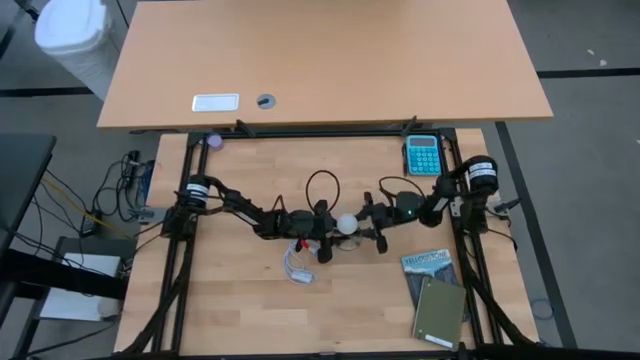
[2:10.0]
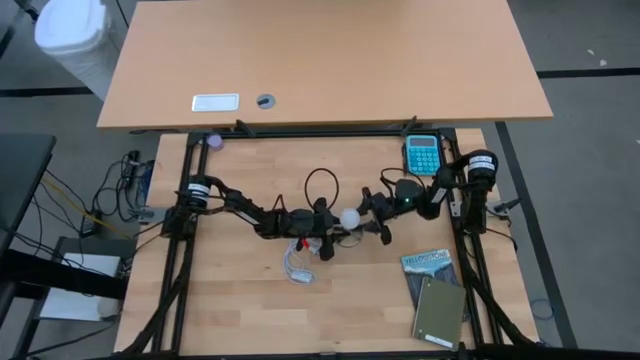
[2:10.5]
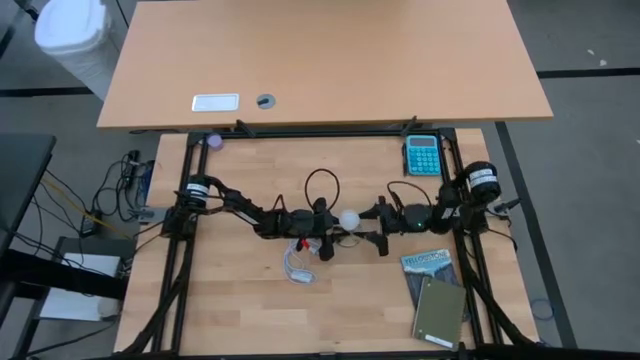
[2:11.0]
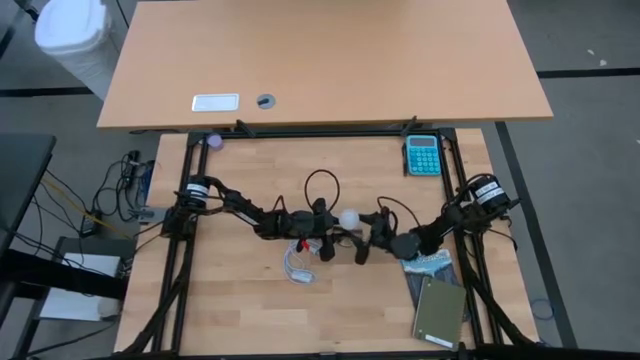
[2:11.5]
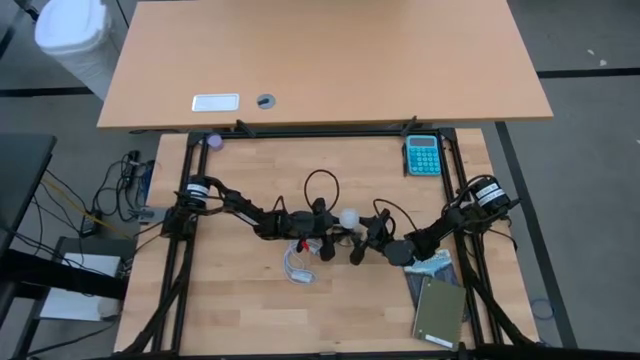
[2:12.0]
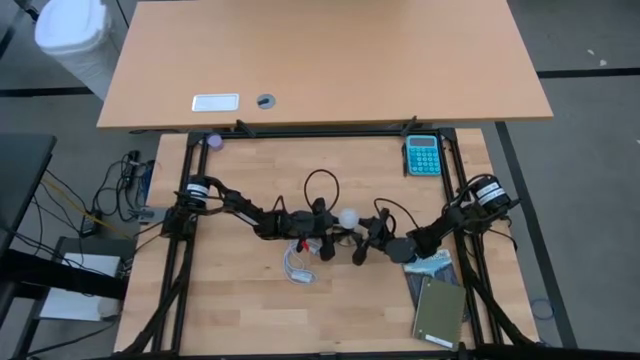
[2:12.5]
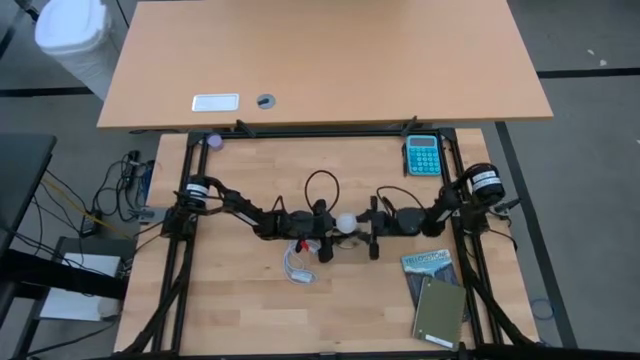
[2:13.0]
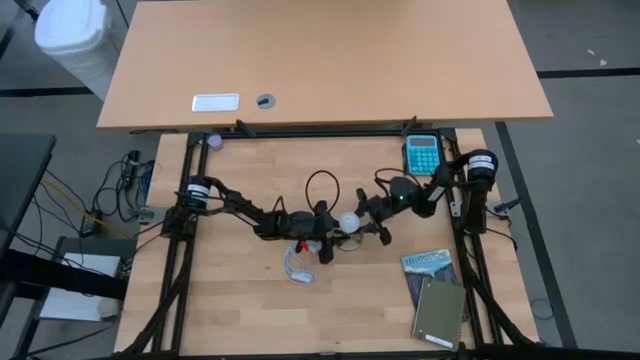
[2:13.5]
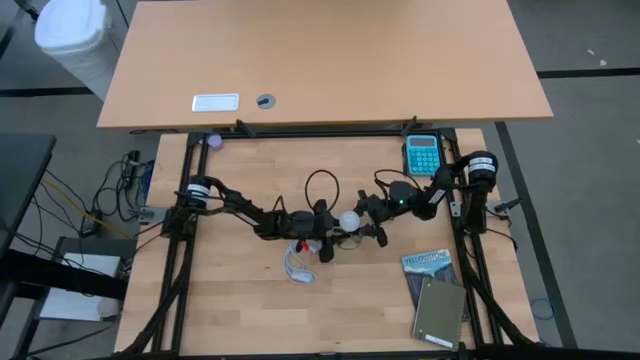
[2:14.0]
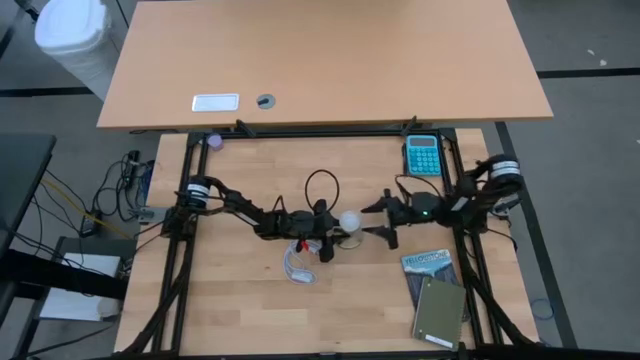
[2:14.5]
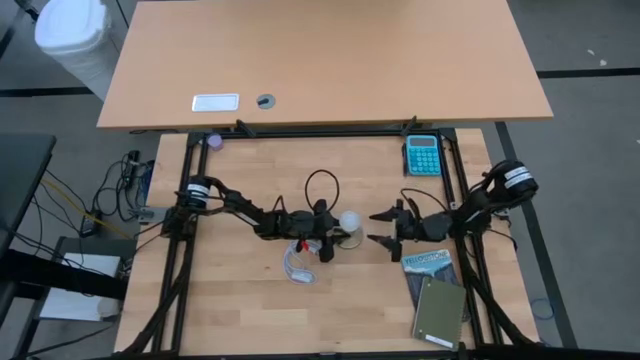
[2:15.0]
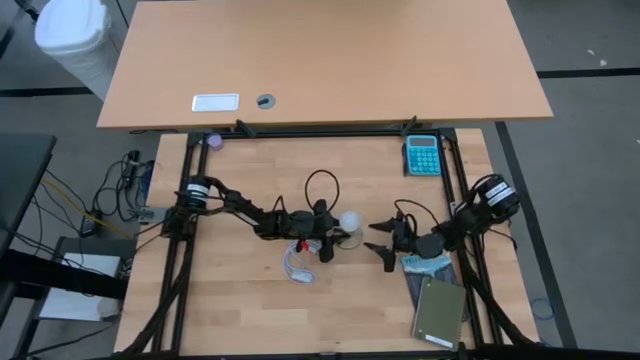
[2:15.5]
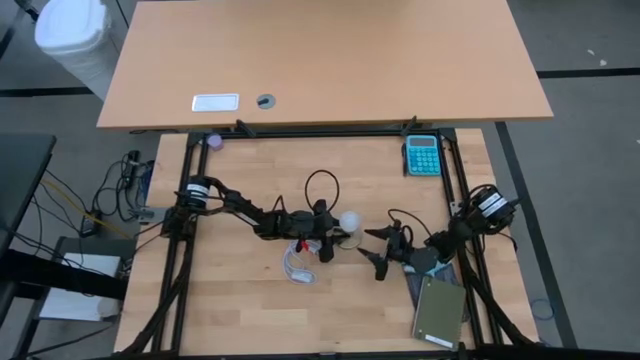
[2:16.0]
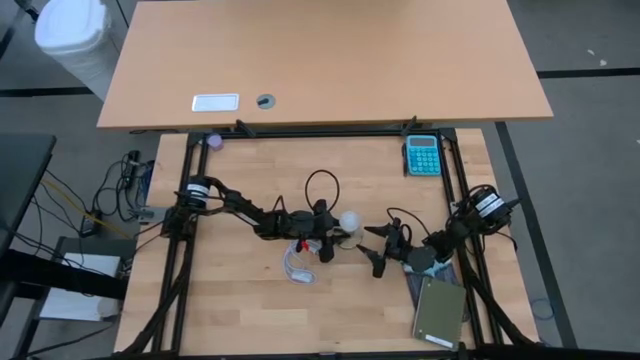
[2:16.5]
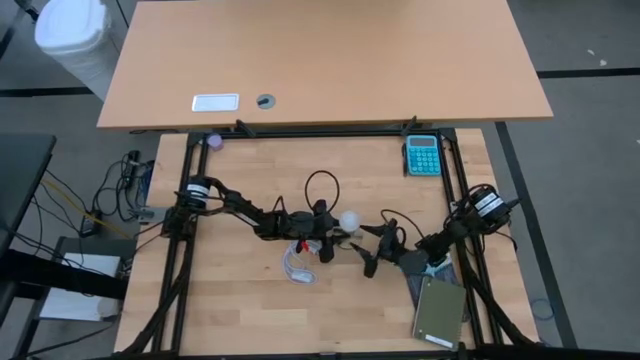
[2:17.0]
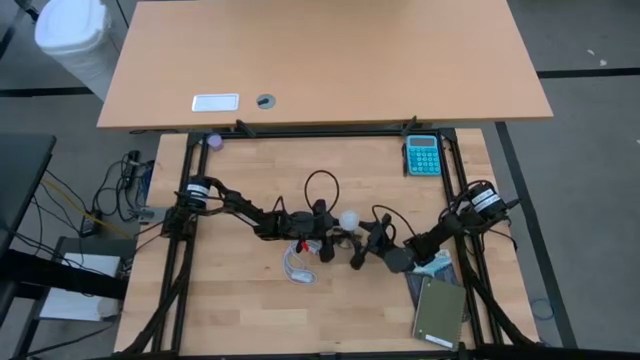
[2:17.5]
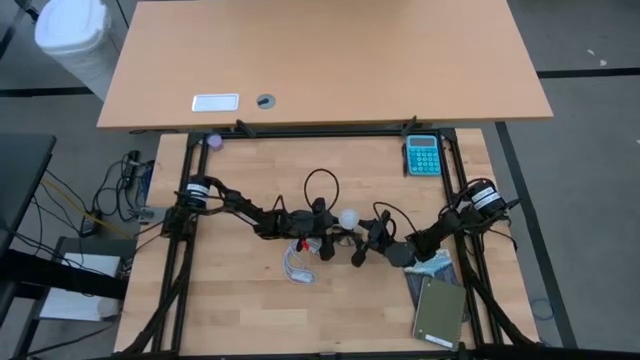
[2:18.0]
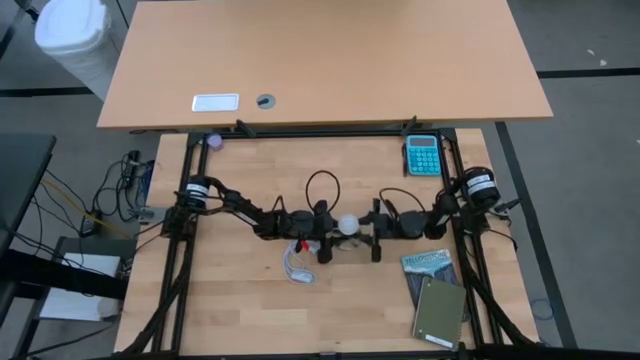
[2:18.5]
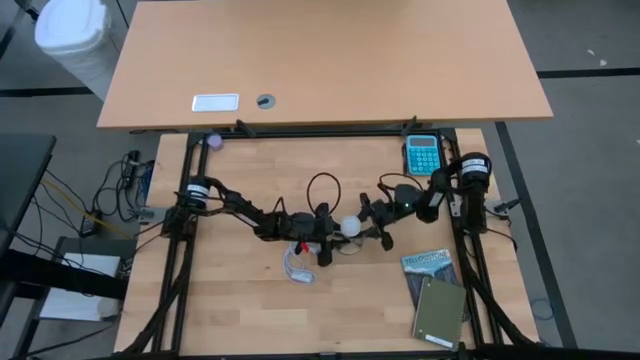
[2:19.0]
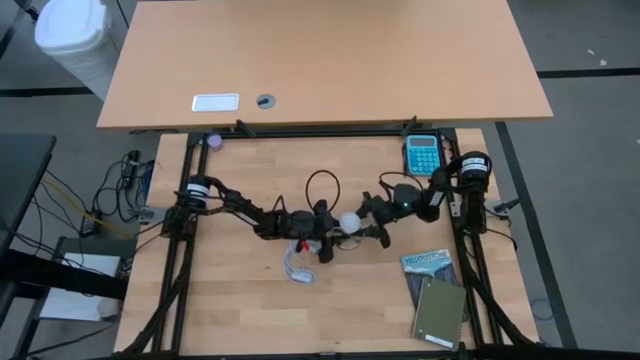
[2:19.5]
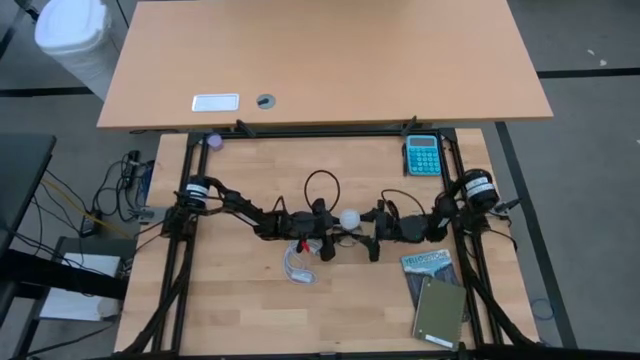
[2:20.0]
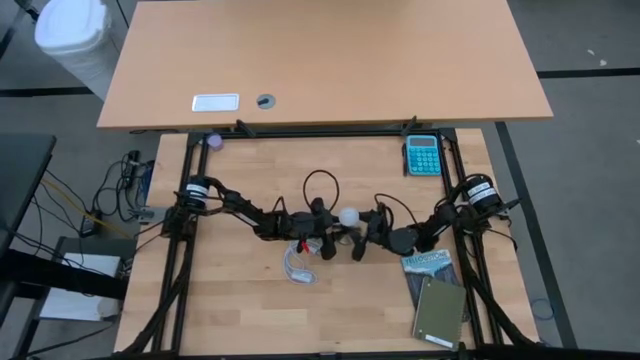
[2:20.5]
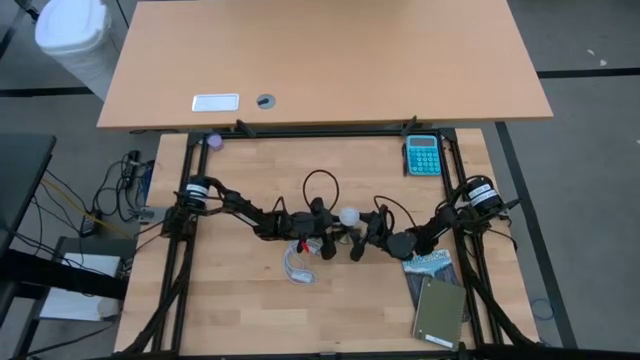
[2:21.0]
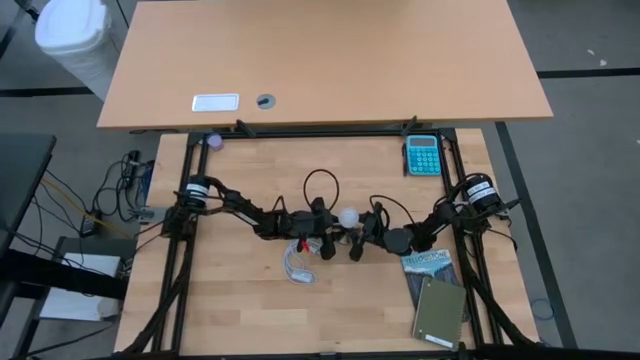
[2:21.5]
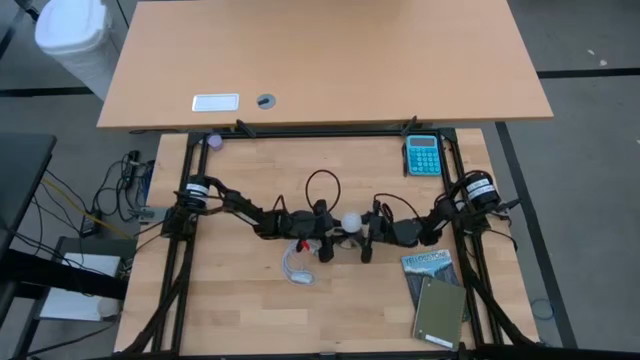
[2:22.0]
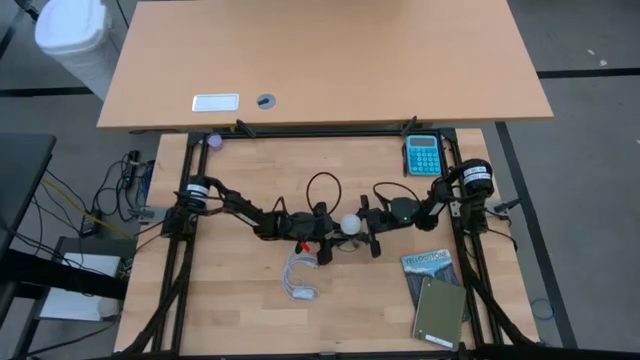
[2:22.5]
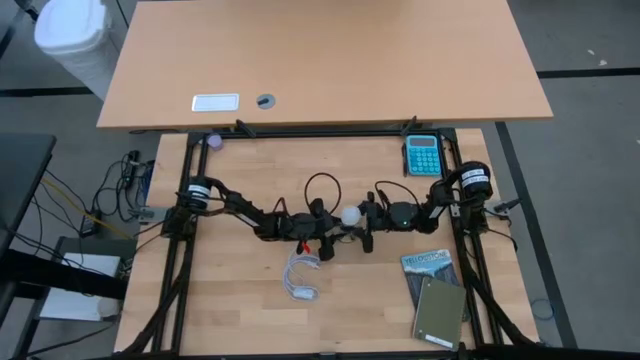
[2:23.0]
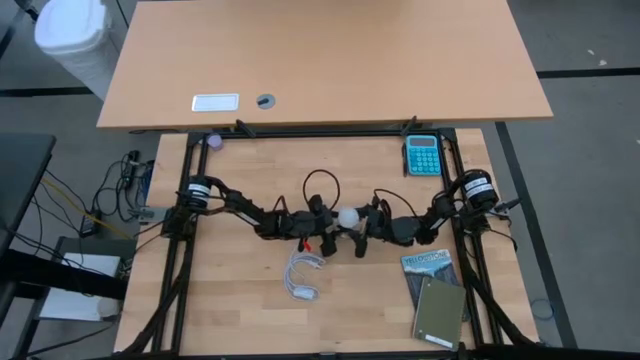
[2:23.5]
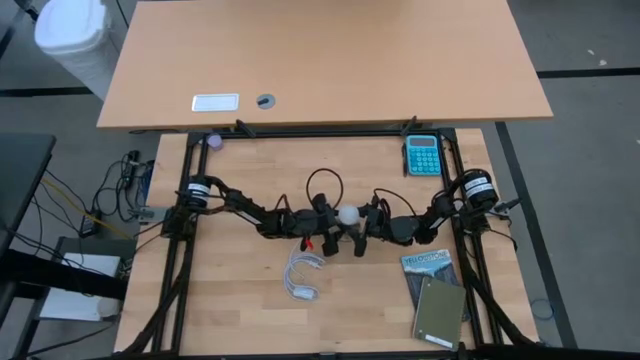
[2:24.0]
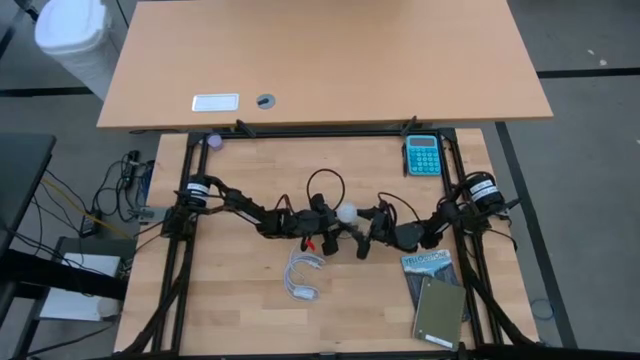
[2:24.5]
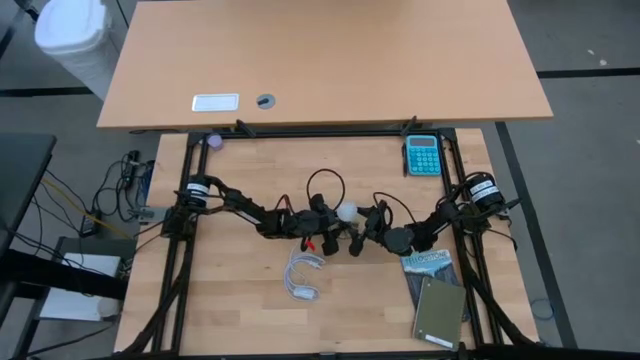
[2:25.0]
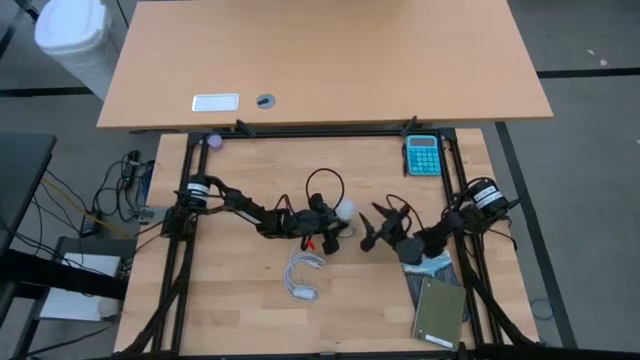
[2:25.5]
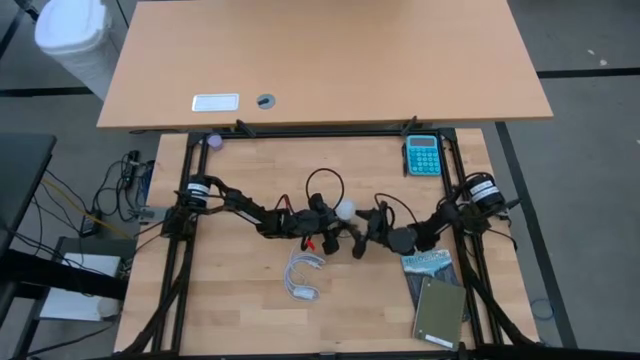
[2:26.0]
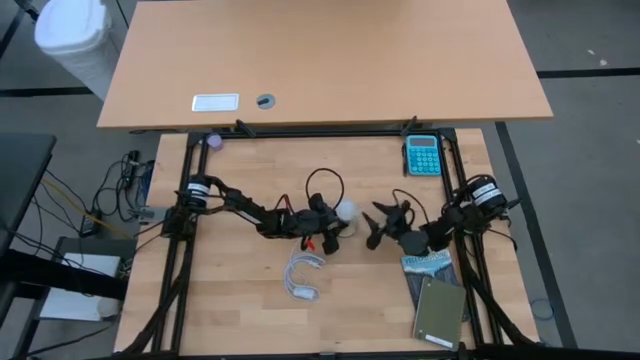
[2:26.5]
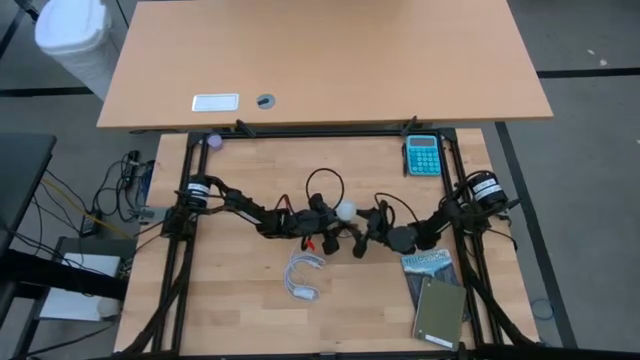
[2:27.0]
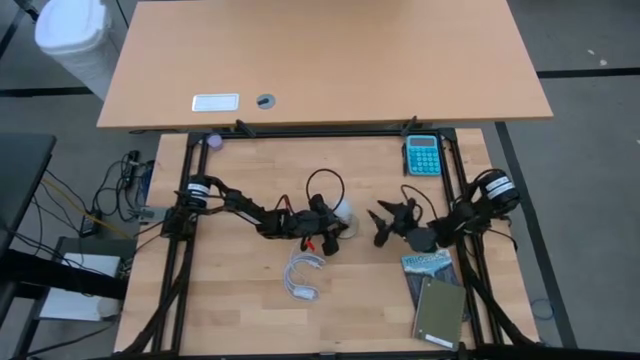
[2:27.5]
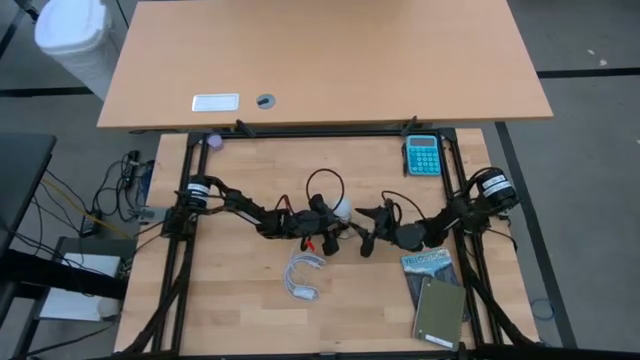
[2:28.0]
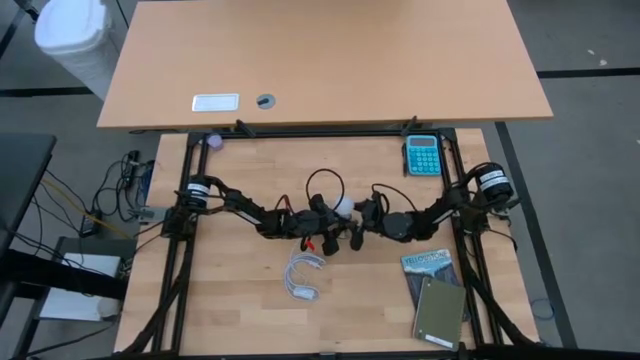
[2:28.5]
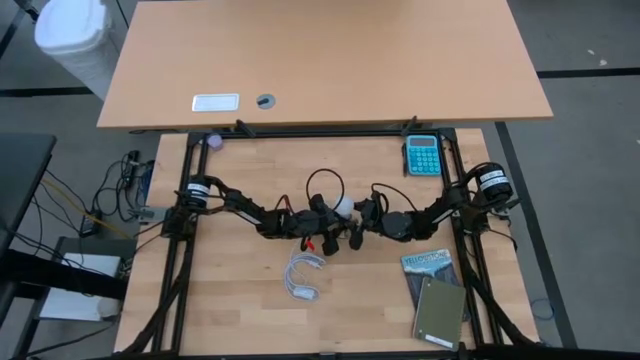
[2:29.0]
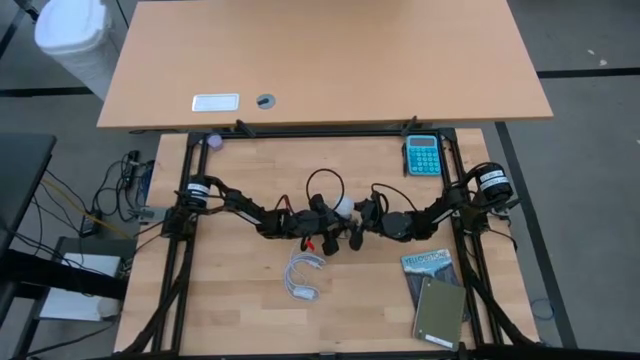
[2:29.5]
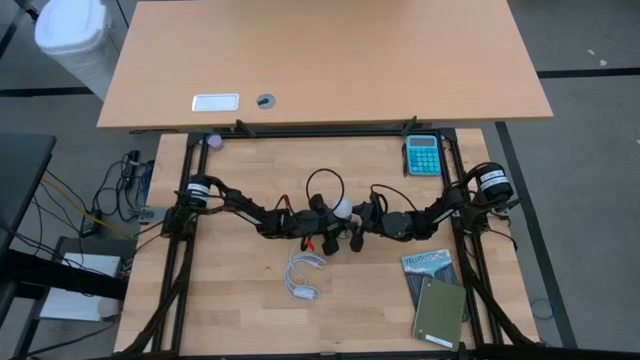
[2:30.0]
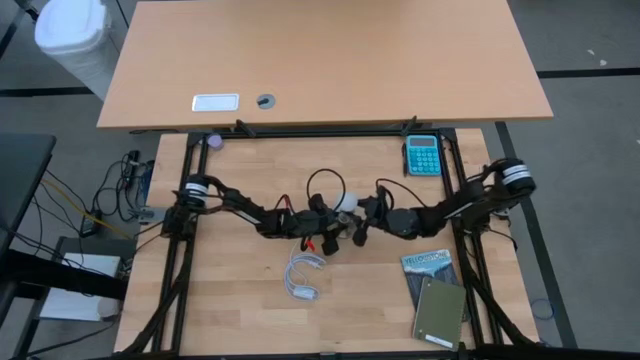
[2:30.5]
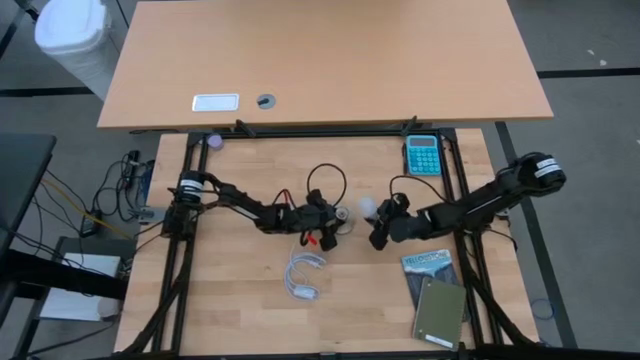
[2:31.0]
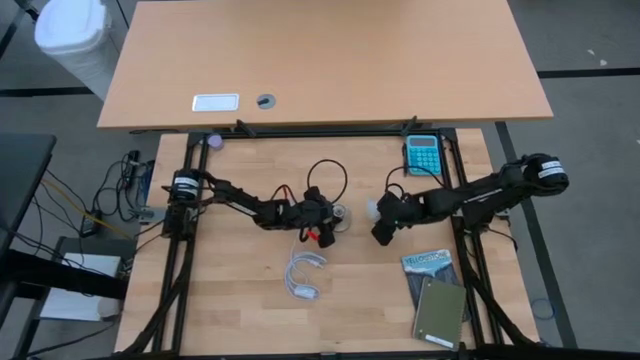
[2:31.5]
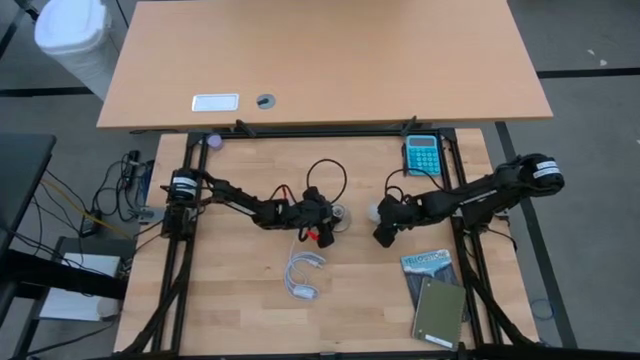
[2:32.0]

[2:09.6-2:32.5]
Task: Screw lightbulb
Remove the lightbulb from the desk lamp
